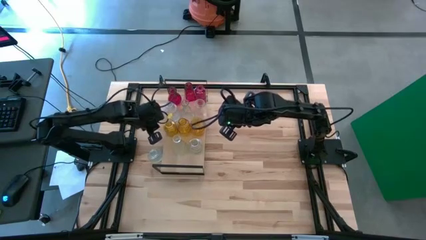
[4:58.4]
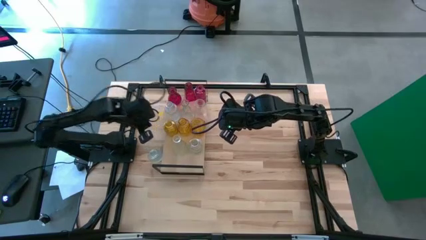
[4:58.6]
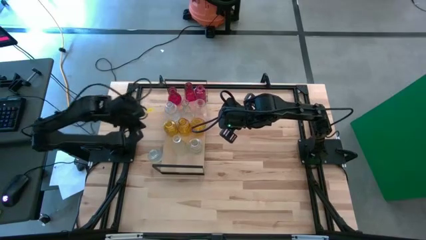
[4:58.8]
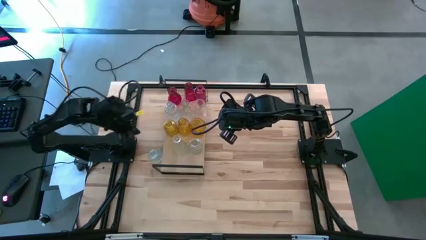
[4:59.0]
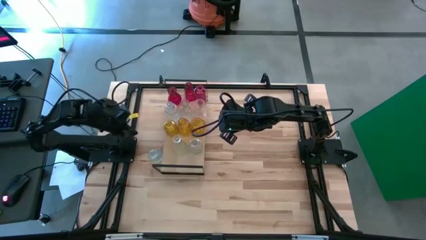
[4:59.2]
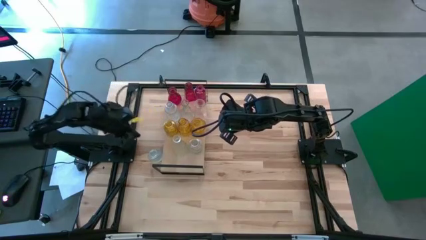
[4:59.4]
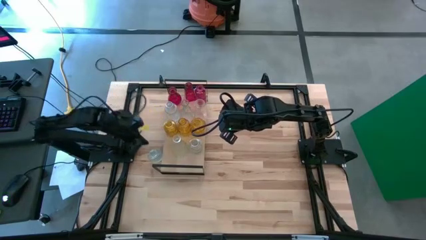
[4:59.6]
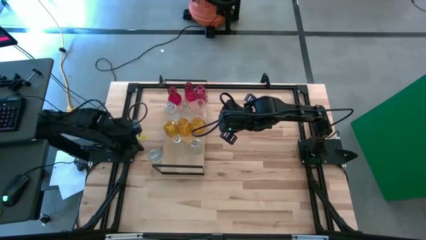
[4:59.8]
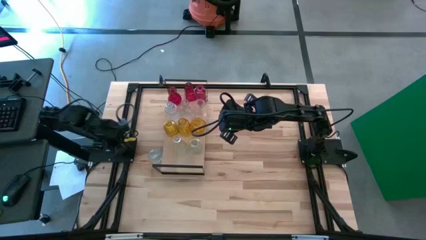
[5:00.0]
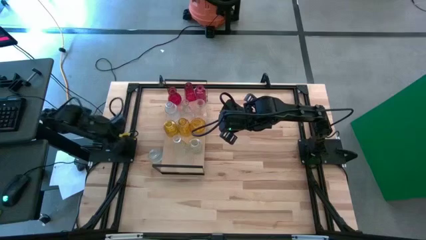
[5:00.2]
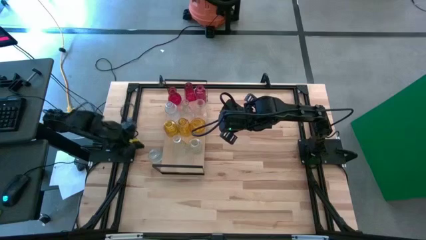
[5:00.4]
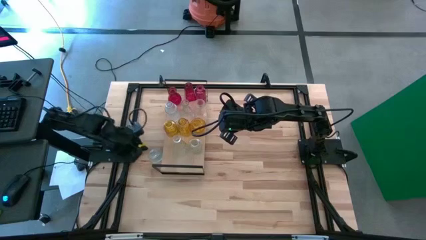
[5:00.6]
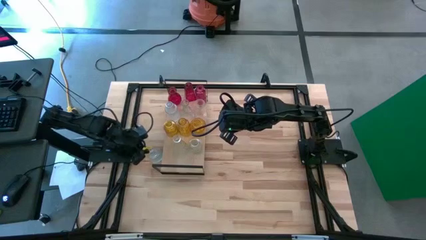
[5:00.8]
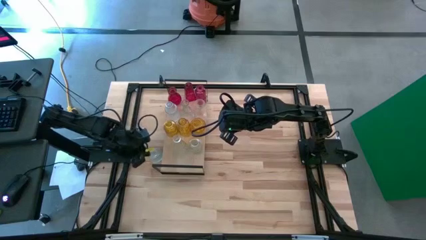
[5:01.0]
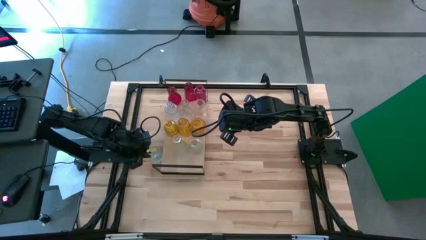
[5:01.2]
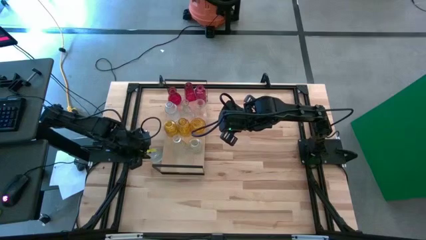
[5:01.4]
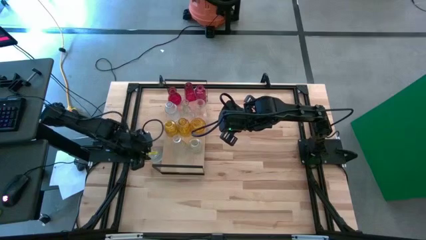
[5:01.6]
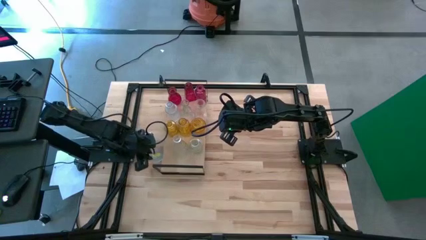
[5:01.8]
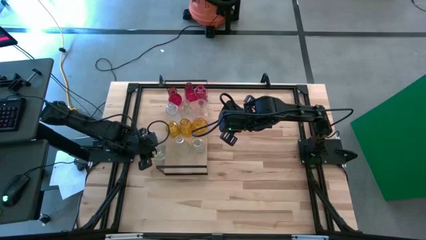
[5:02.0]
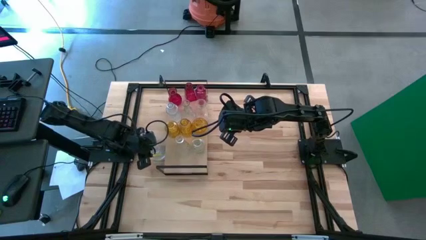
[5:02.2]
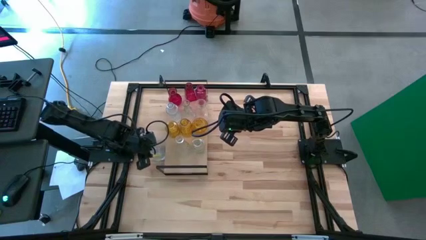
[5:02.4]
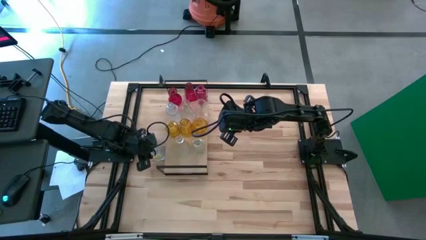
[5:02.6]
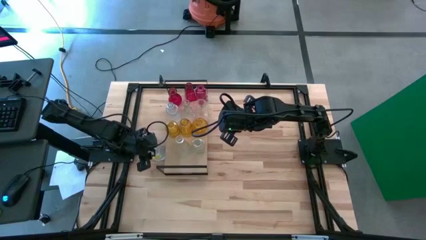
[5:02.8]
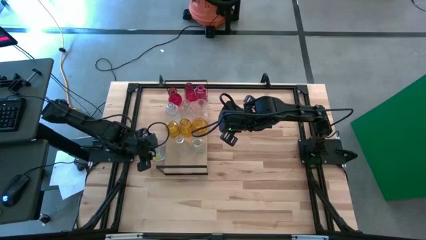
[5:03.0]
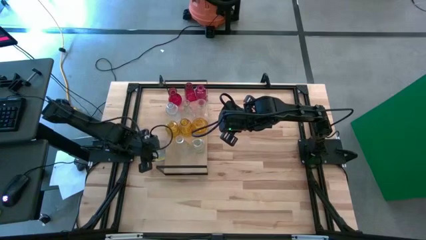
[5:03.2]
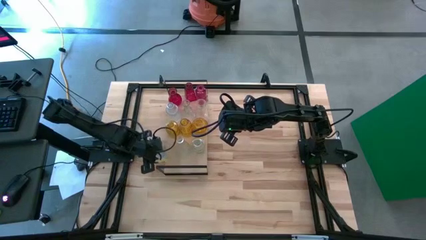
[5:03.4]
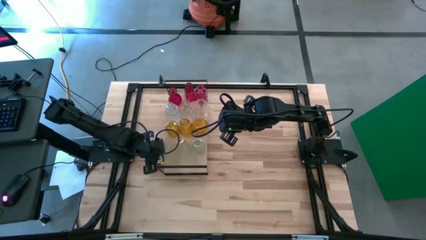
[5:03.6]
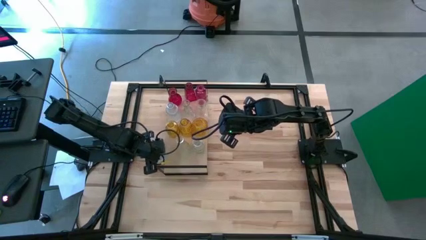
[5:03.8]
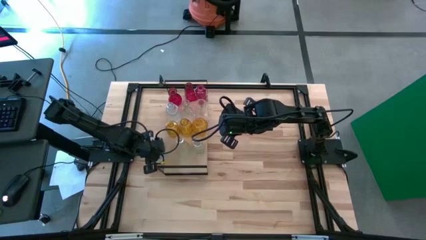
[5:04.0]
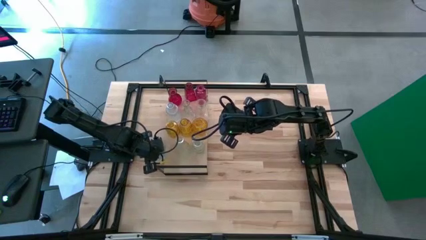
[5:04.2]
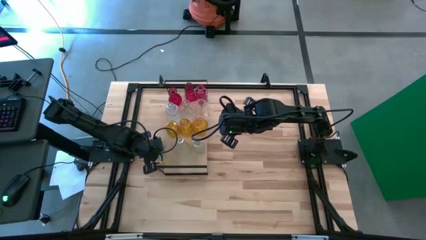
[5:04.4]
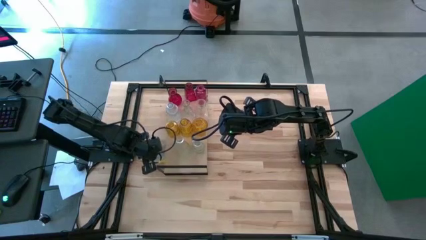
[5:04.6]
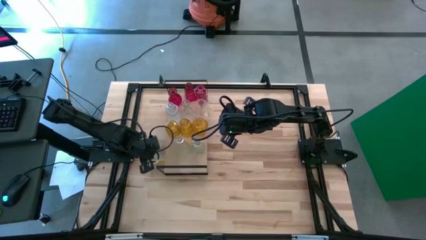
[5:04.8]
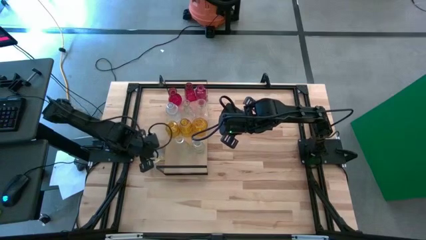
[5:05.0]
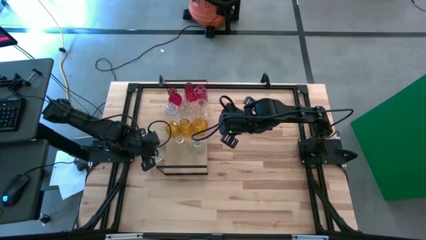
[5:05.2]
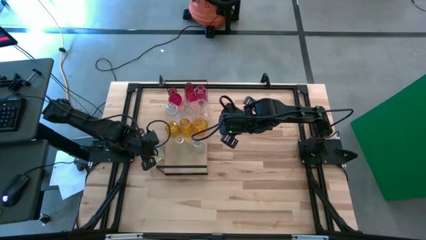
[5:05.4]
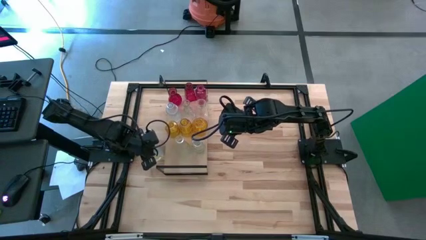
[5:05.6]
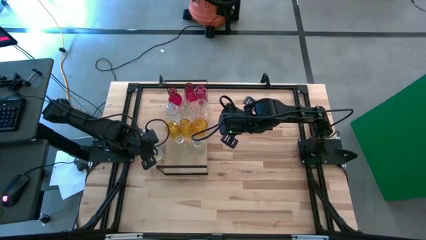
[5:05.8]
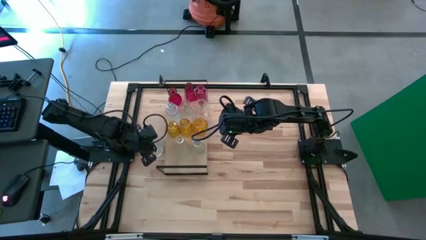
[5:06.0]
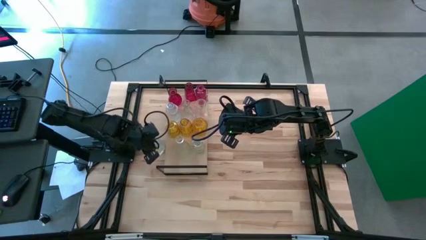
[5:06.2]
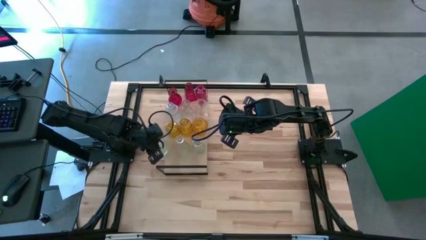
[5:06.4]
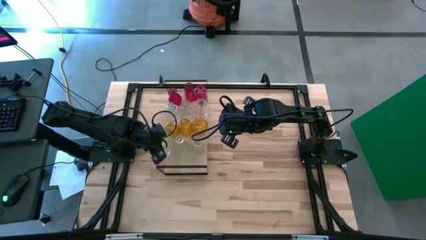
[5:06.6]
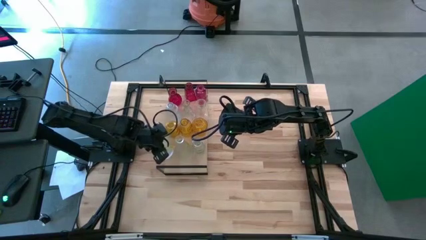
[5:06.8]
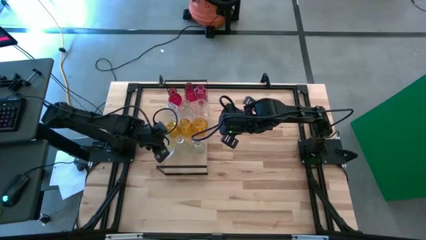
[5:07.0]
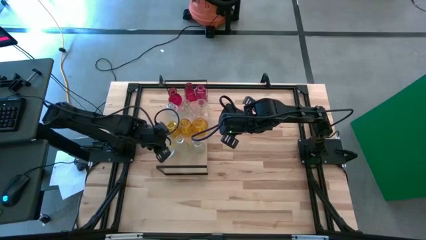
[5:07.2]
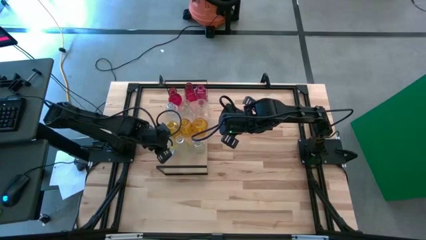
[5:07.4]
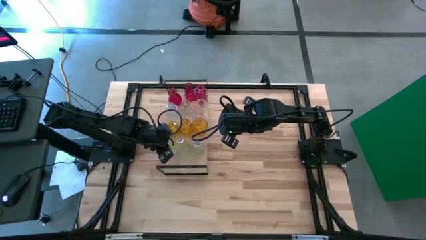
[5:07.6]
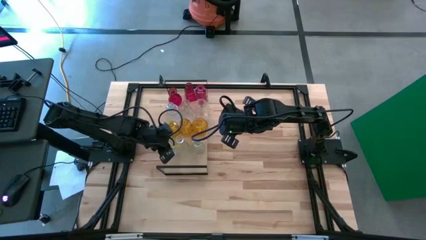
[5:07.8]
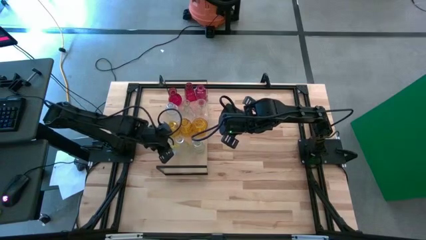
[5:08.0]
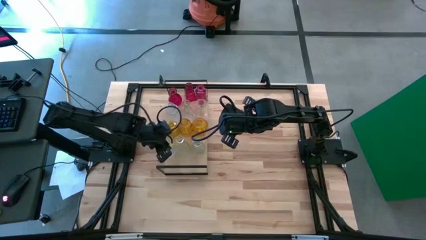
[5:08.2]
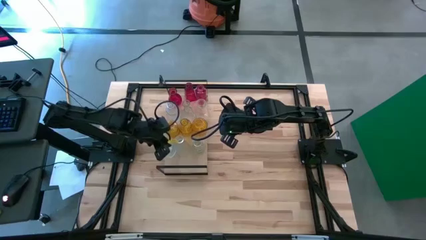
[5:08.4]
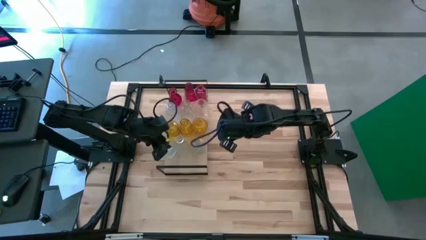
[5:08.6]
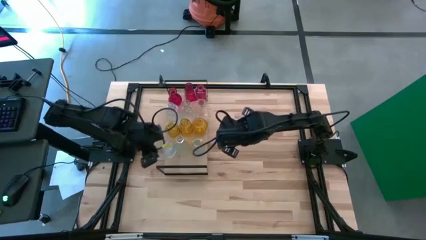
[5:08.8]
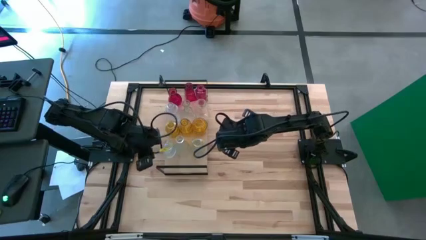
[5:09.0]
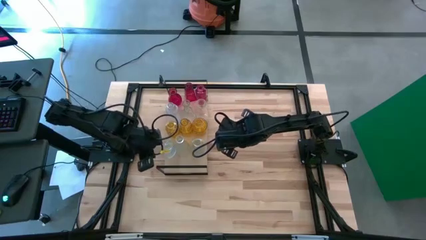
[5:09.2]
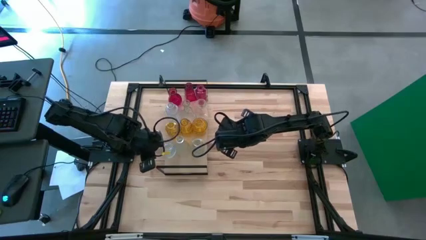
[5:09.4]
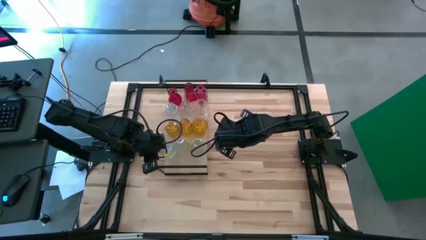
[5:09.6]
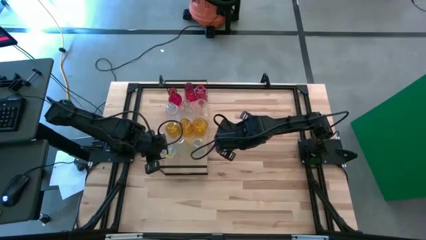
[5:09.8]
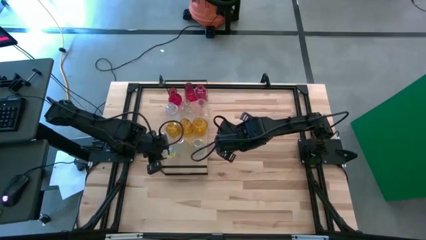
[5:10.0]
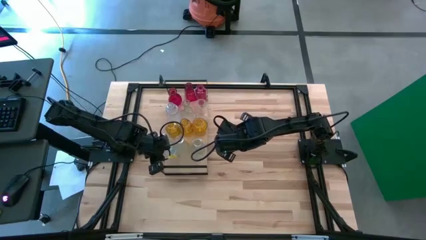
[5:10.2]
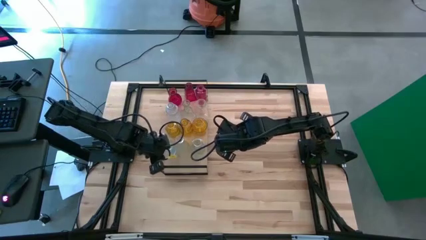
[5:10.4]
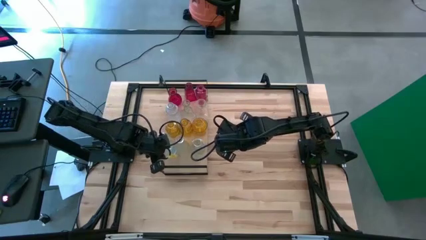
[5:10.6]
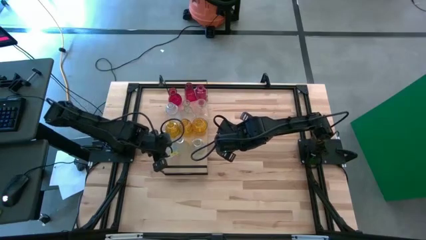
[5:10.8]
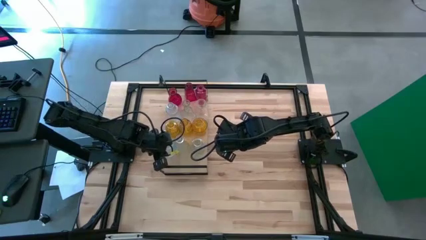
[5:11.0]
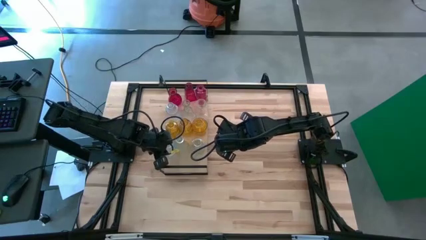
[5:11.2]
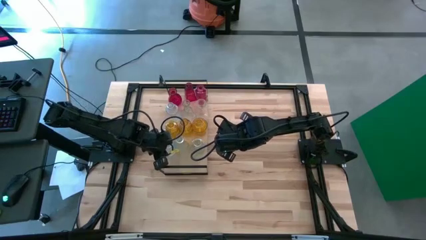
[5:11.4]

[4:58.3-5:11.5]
Task: sort vases onto shelf
Put the transparent vase on the shelf aligned with the other transparent vase
